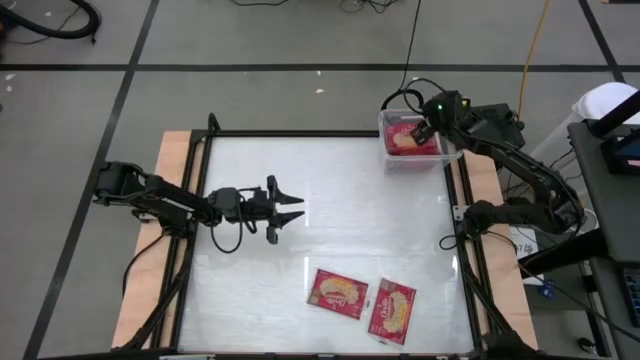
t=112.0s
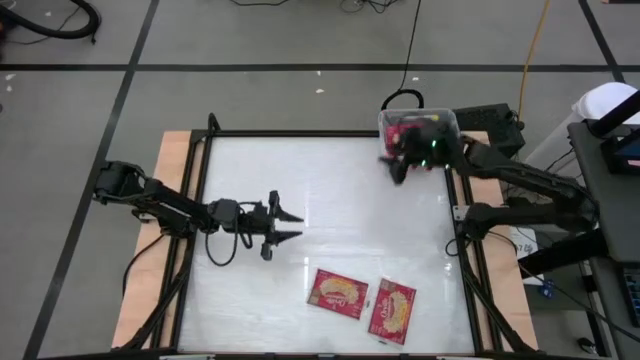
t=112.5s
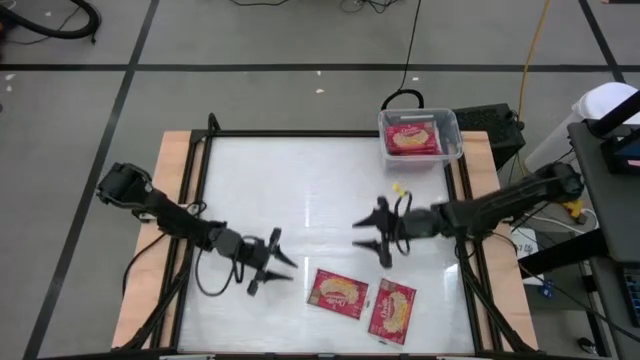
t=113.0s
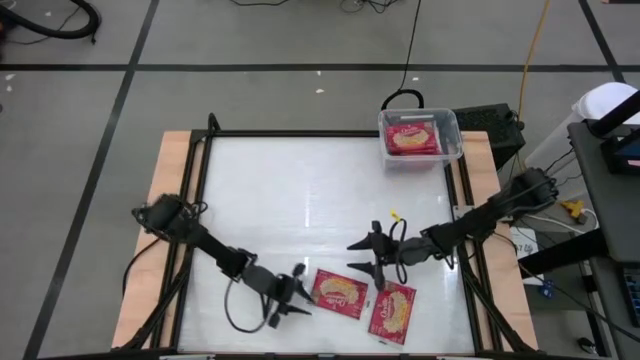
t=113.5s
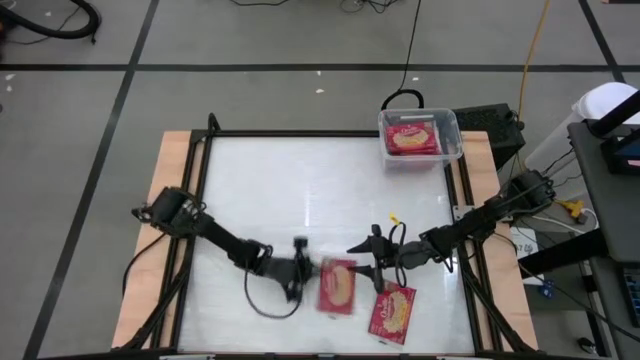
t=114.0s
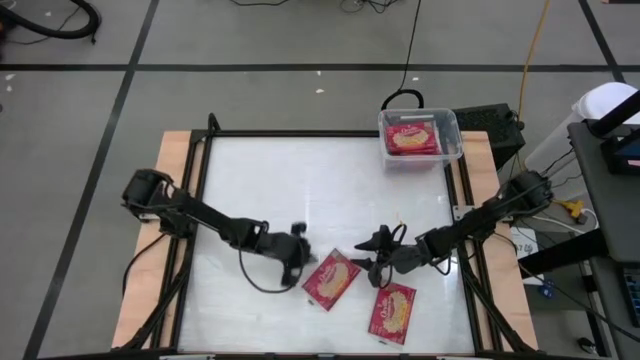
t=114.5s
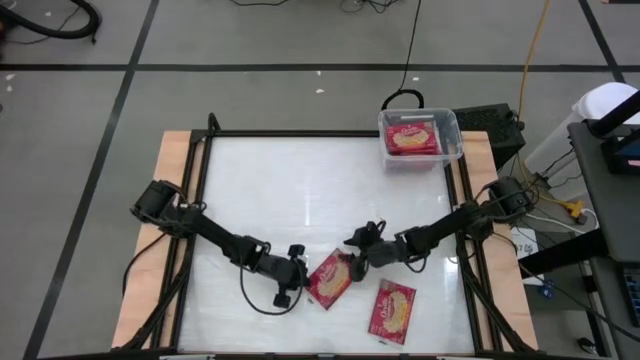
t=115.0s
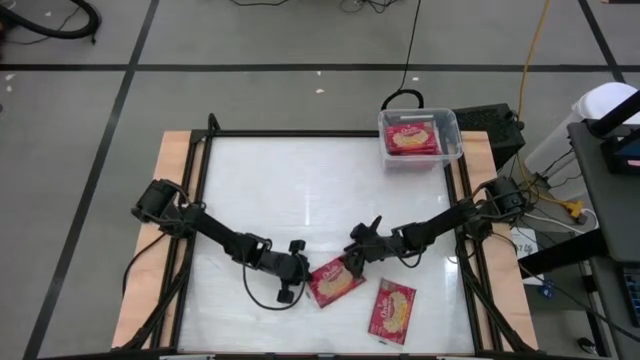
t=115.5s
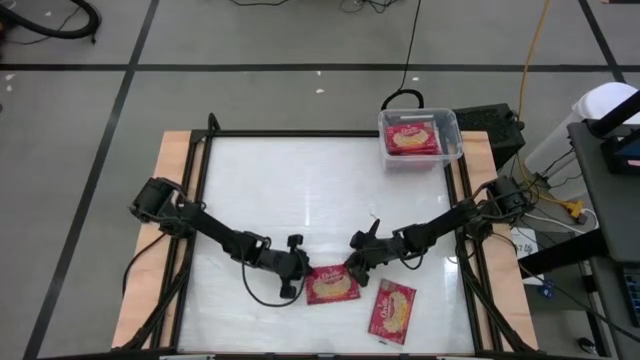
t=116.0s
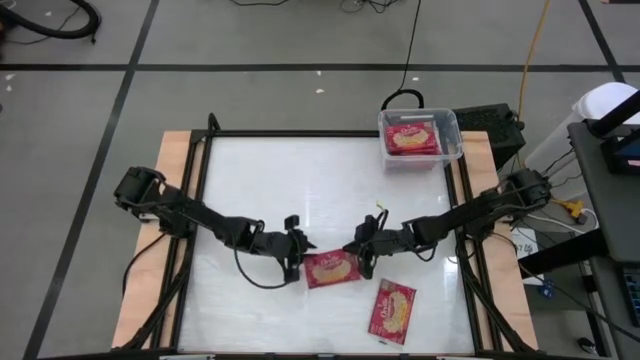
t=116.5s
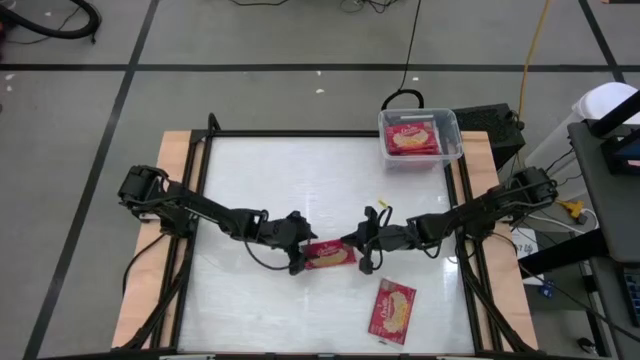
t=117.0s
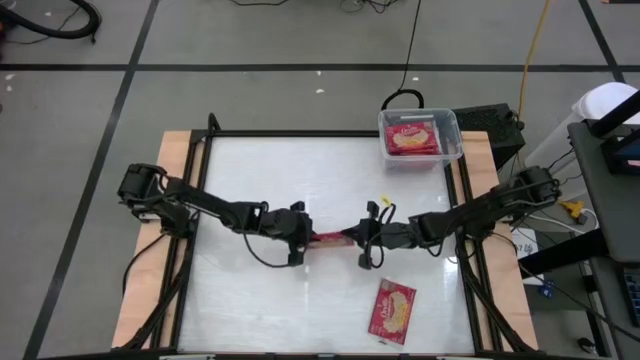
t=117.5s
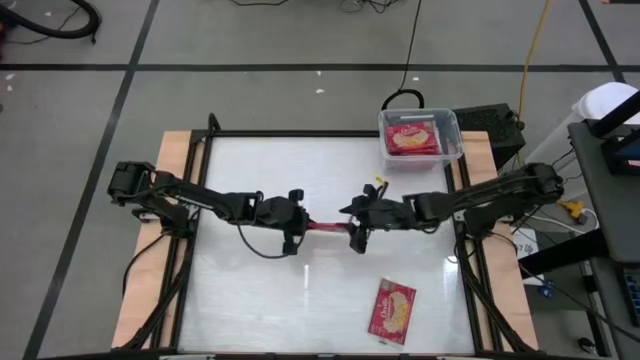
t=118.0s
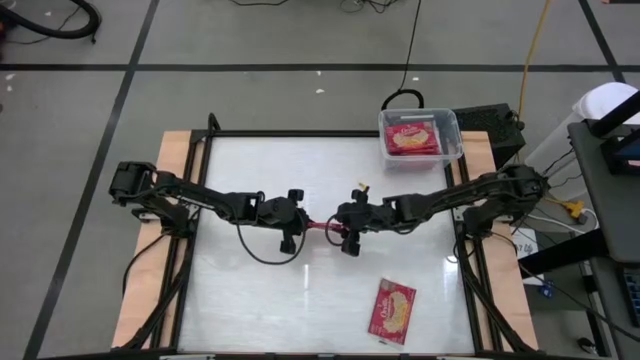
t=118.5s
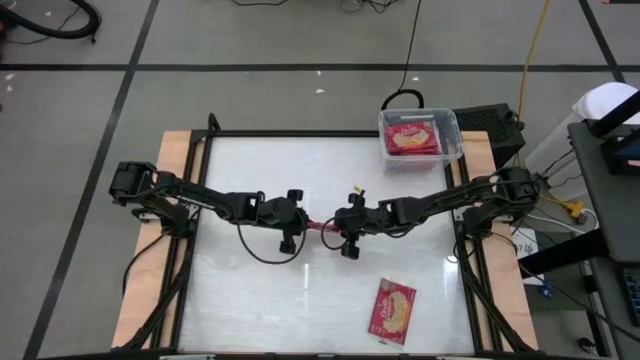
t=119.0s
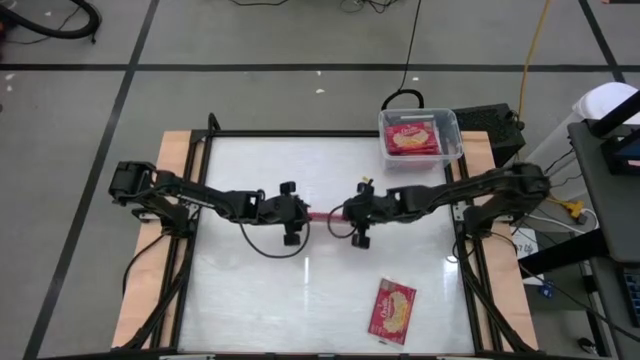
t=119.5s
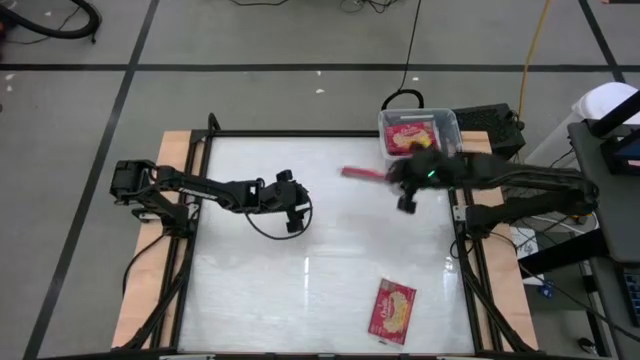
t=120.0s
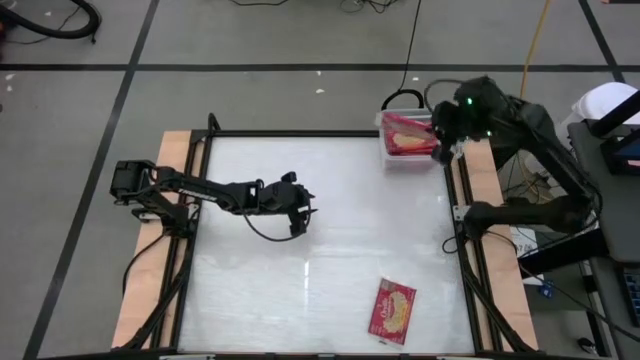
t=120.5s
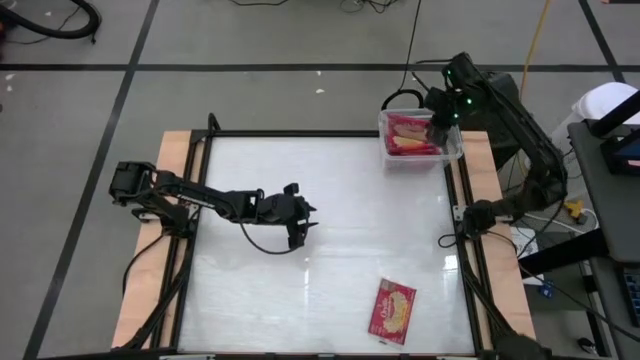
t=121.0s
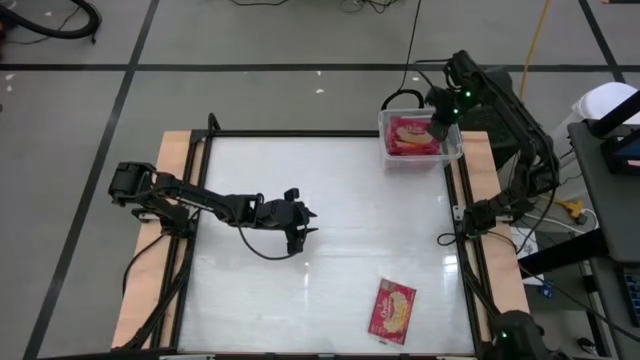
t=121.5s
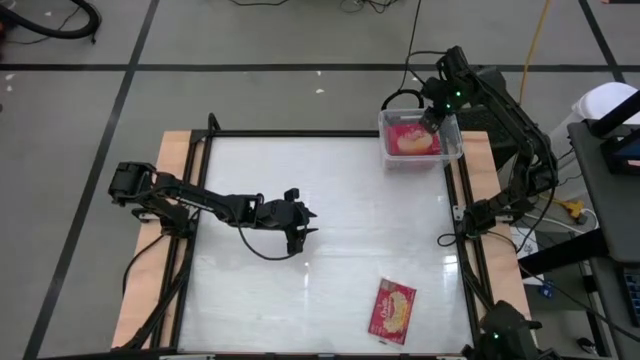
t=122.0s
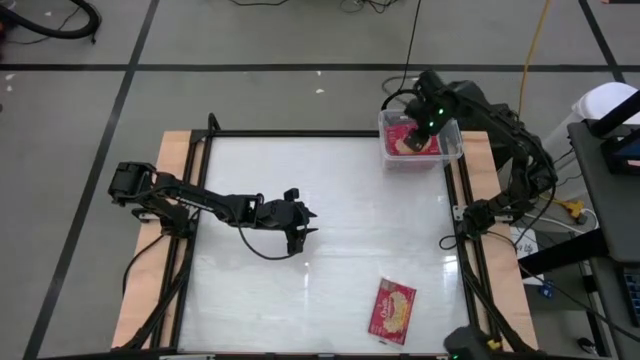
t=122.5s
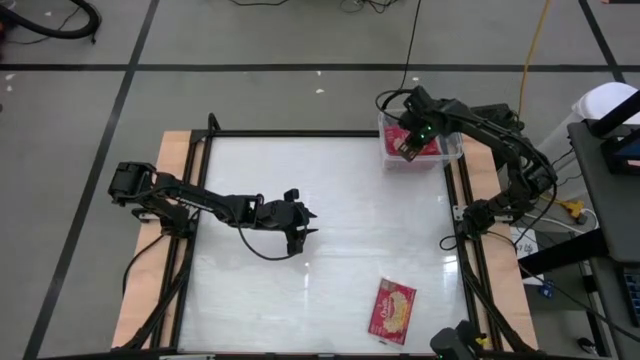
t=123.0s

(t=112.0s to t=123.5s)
Task: Sort popcorn bags into baskets
Put the red popcorn bag into the transparent bin

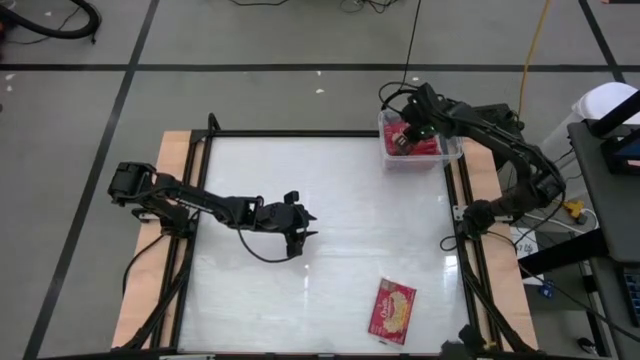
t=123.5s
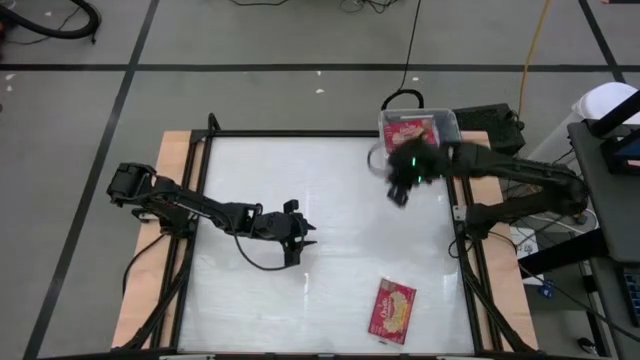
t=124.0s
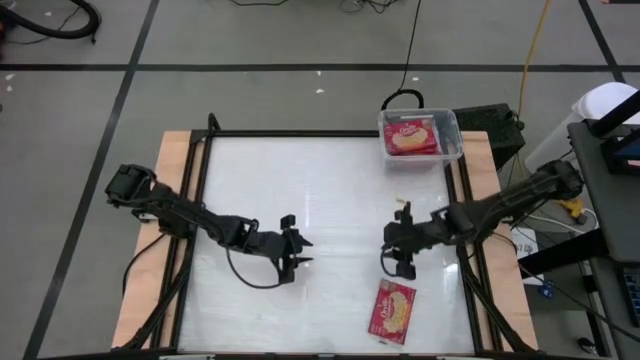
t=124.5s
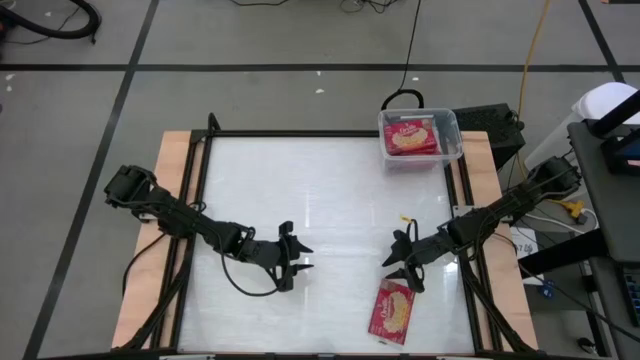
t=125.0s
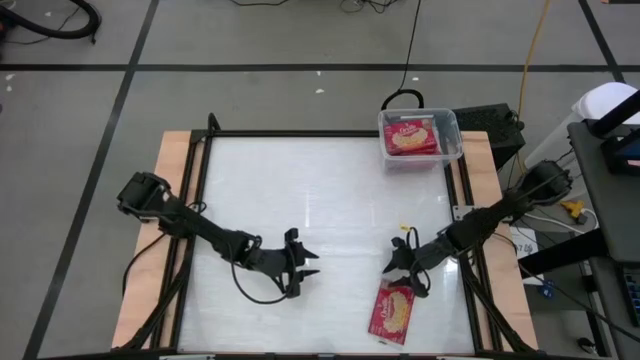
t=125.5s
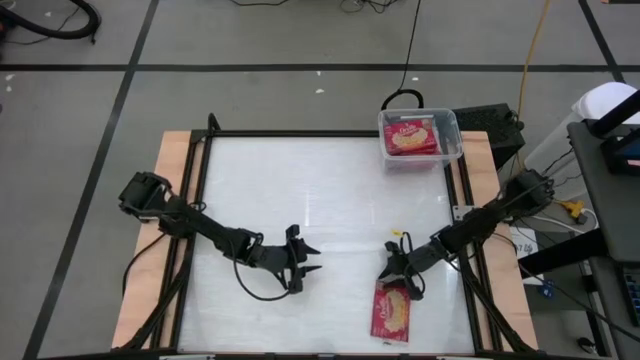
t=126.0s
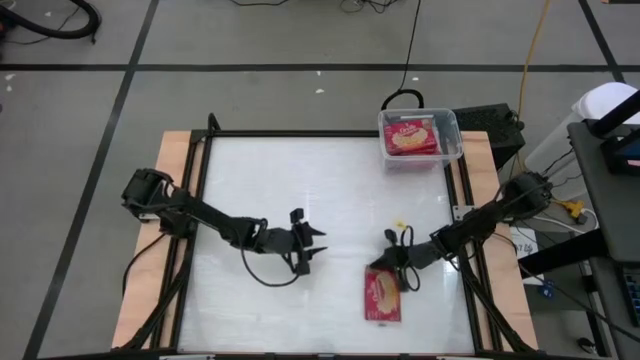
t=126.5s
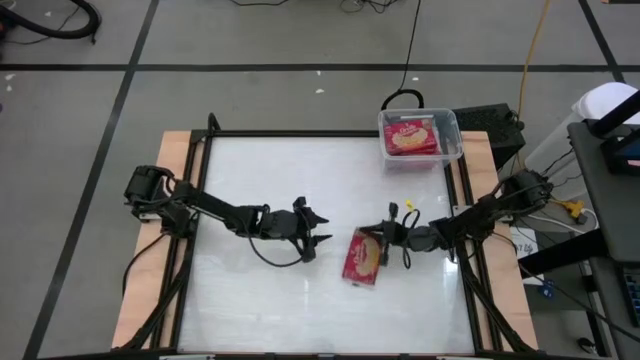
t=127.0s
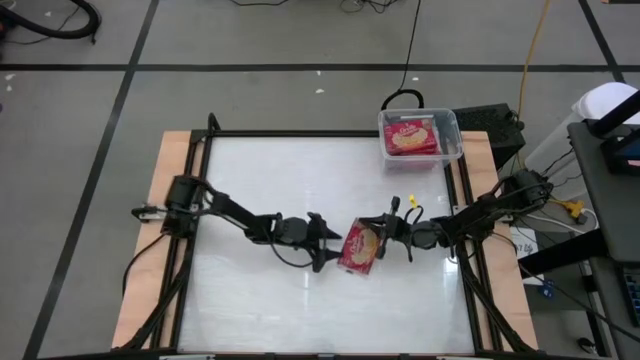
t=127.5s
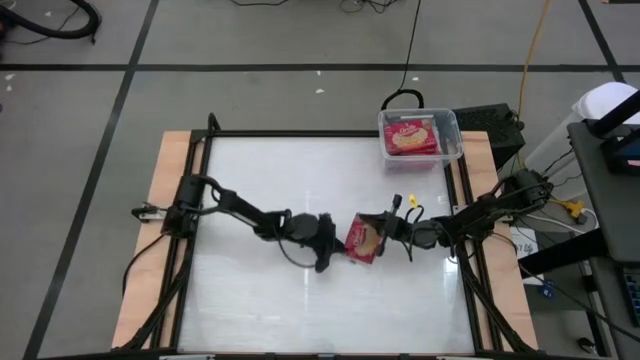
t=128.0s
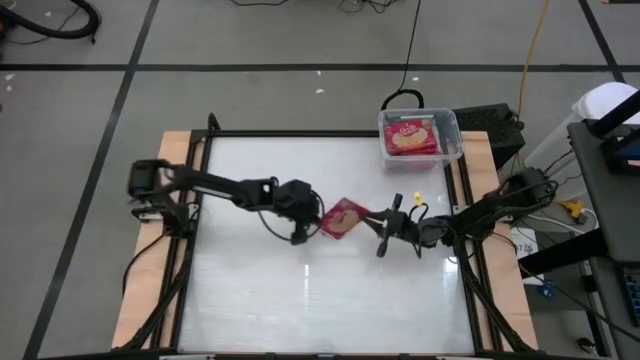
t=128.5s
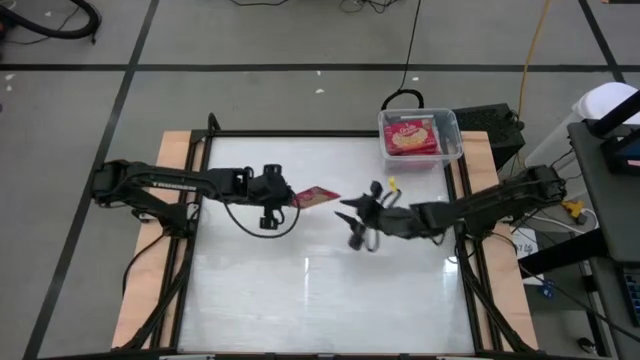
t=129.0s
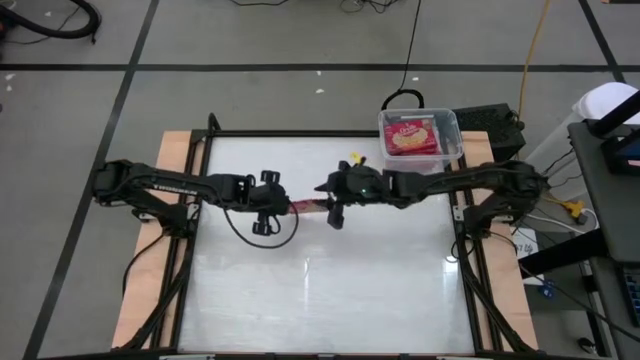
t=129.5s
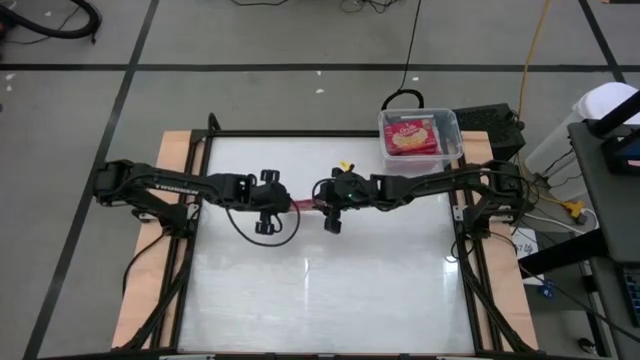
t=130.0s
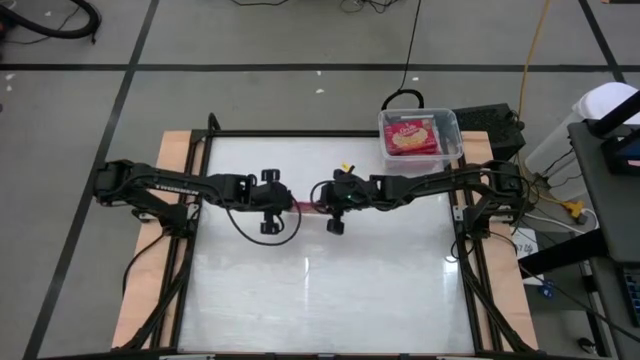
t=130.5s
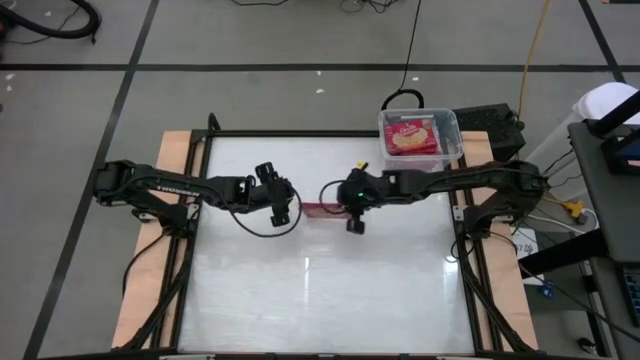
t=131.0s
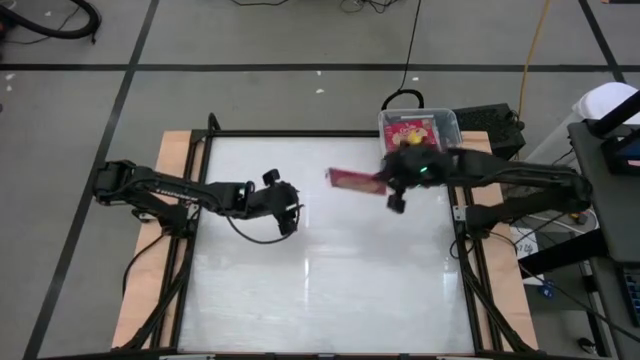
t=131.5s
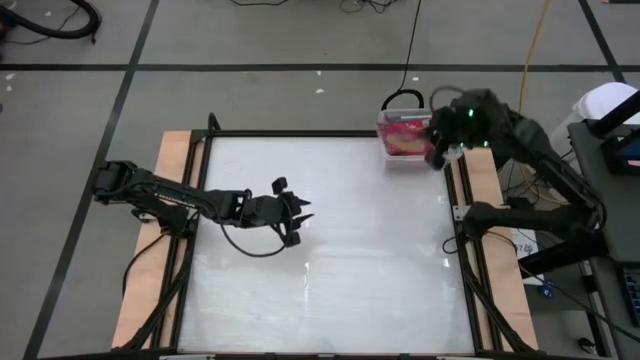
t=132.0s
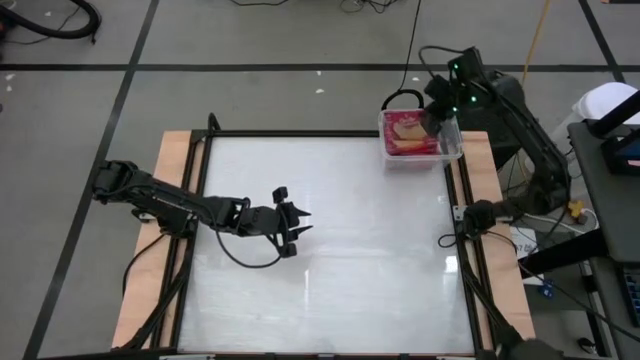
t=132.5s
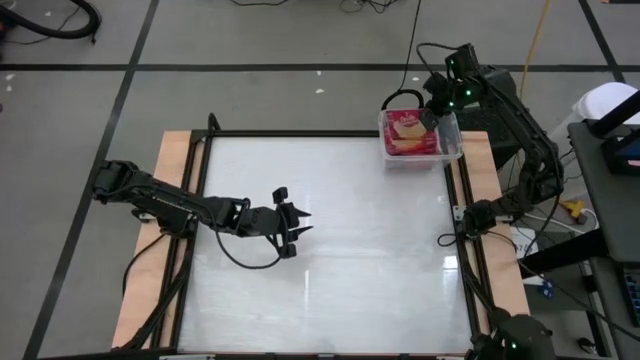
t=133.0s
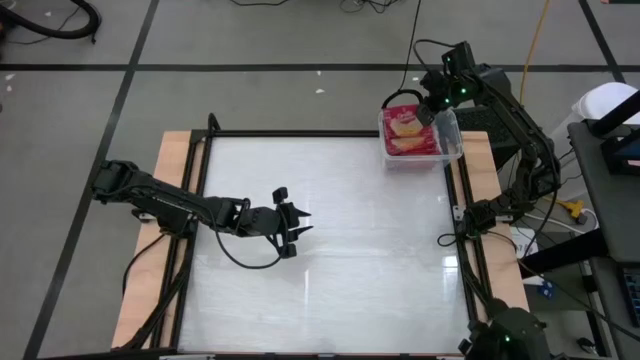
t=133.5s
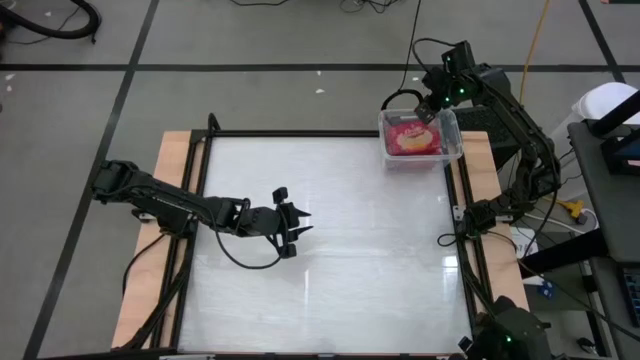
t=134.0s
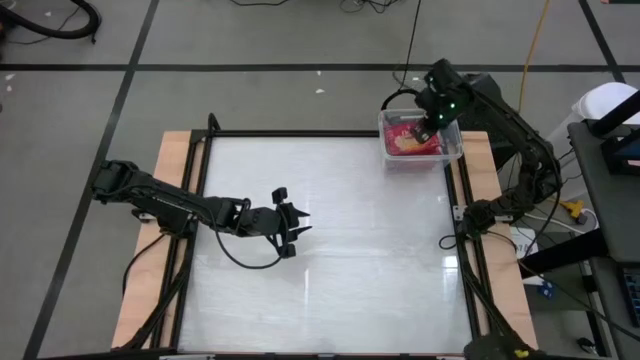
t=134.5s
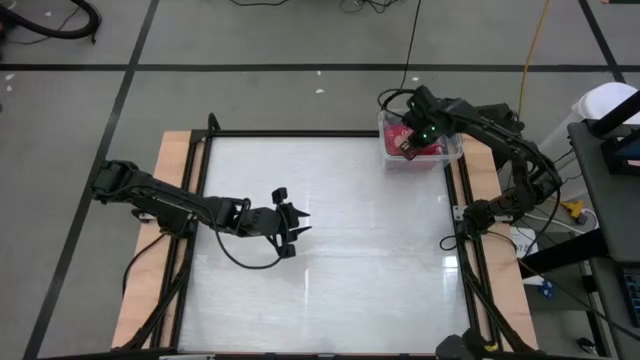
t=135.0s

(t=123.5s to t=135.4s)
Put the red popcorn bag into the transparent bin
